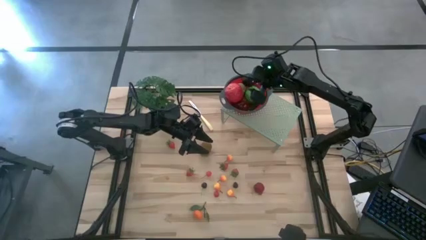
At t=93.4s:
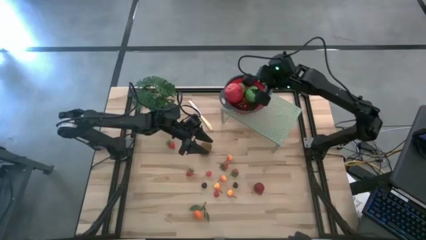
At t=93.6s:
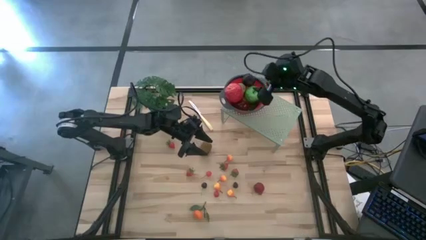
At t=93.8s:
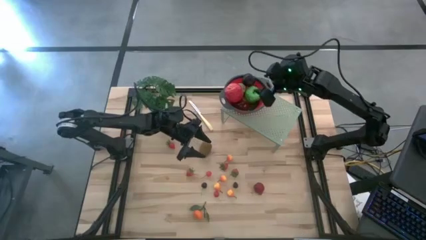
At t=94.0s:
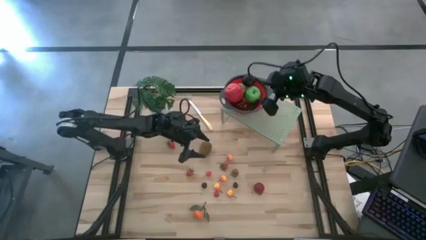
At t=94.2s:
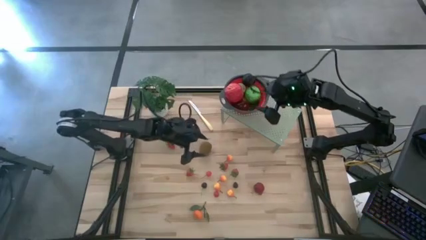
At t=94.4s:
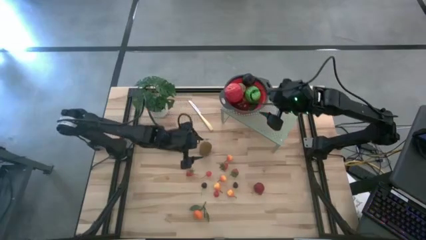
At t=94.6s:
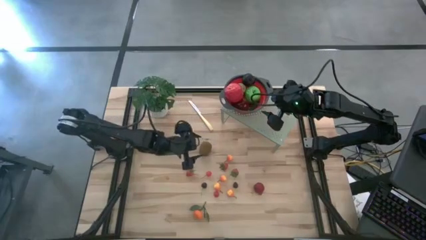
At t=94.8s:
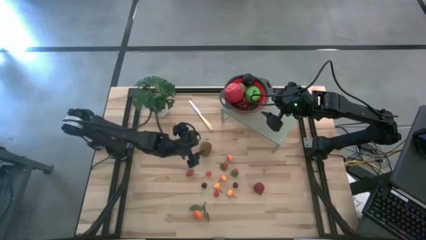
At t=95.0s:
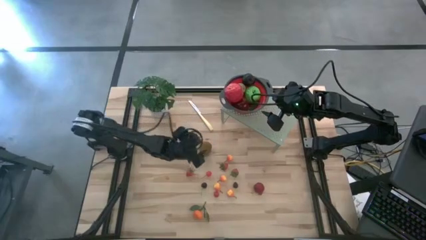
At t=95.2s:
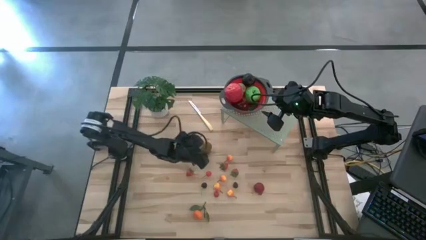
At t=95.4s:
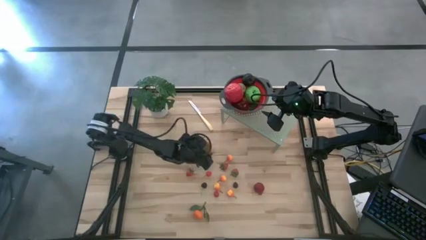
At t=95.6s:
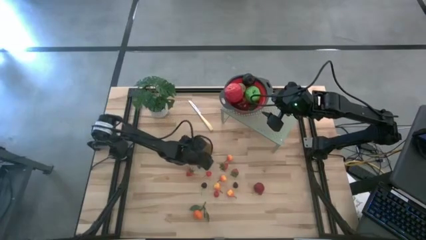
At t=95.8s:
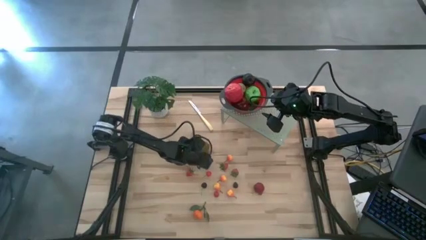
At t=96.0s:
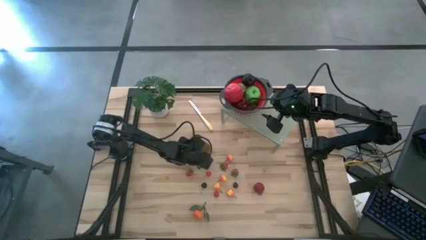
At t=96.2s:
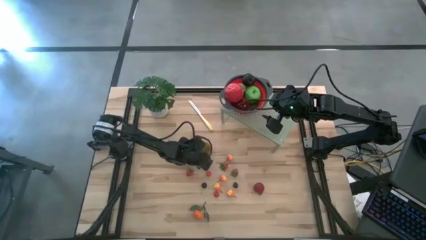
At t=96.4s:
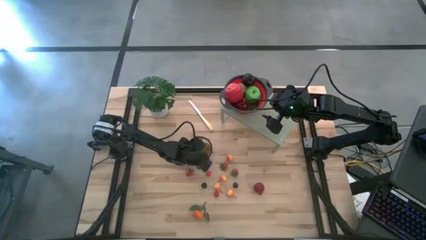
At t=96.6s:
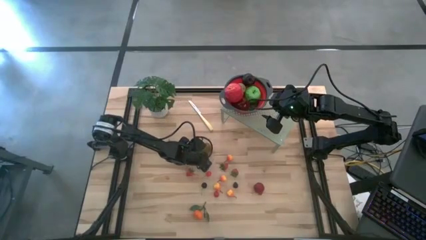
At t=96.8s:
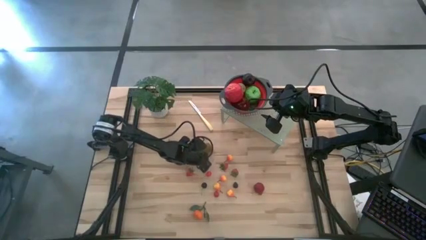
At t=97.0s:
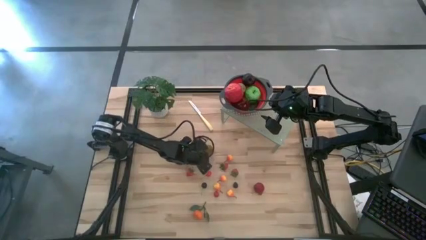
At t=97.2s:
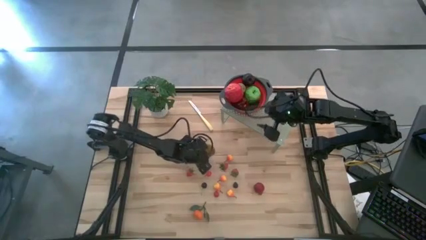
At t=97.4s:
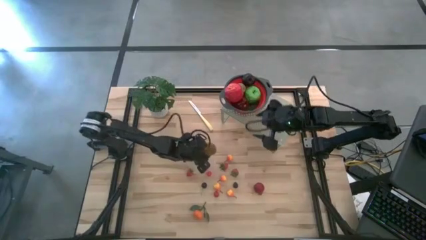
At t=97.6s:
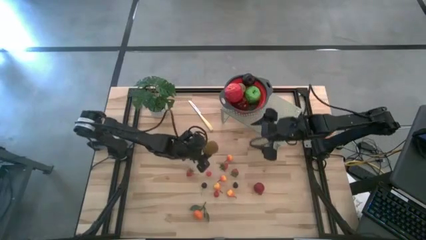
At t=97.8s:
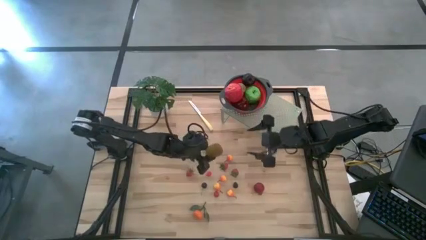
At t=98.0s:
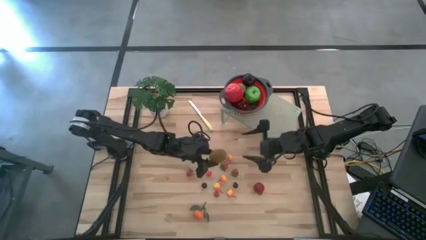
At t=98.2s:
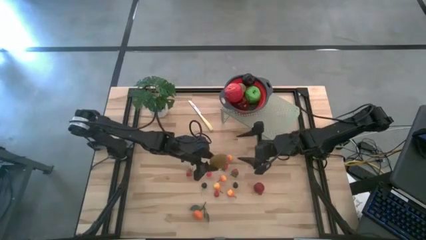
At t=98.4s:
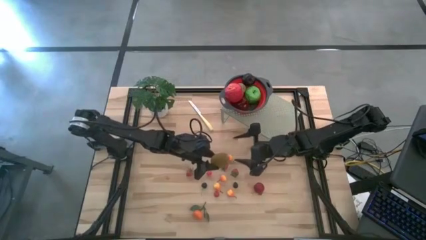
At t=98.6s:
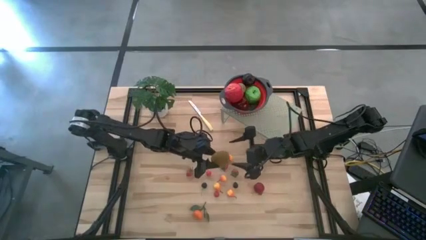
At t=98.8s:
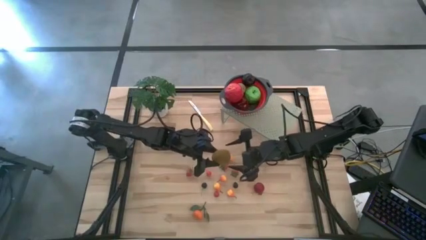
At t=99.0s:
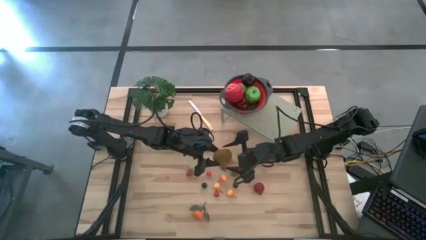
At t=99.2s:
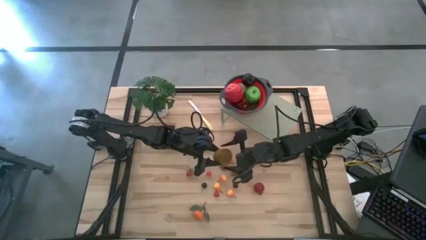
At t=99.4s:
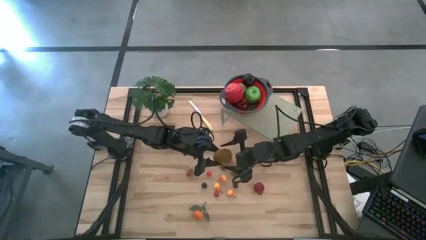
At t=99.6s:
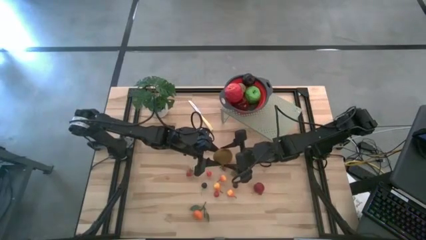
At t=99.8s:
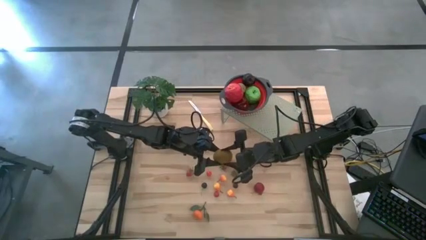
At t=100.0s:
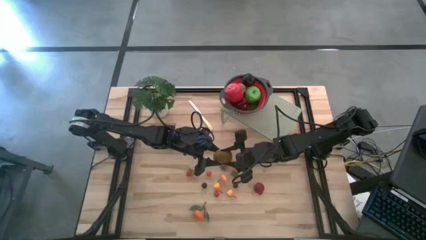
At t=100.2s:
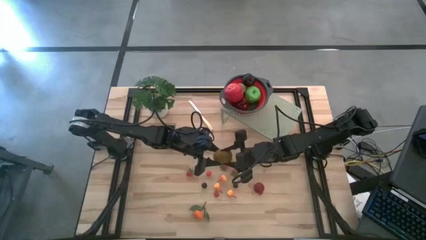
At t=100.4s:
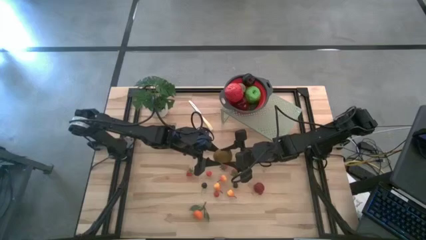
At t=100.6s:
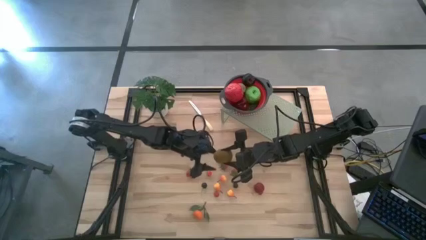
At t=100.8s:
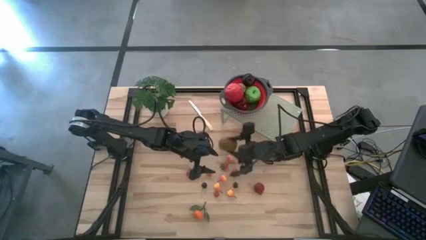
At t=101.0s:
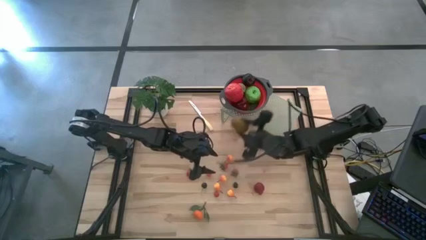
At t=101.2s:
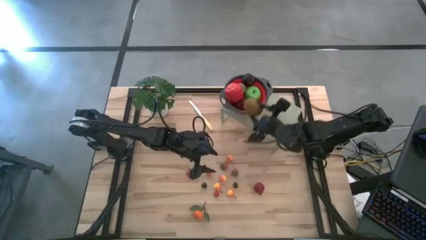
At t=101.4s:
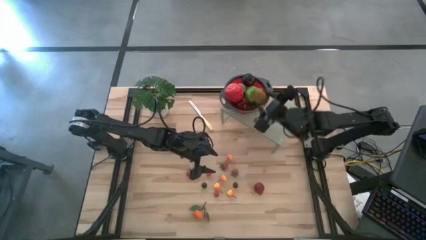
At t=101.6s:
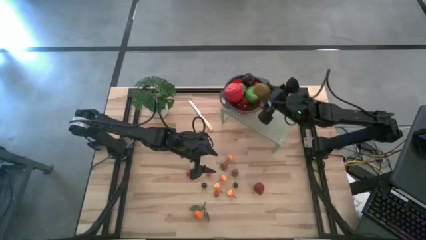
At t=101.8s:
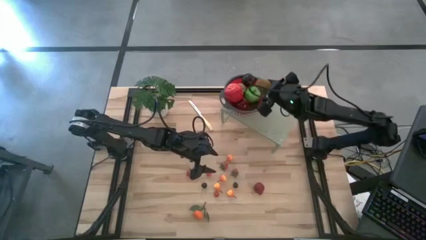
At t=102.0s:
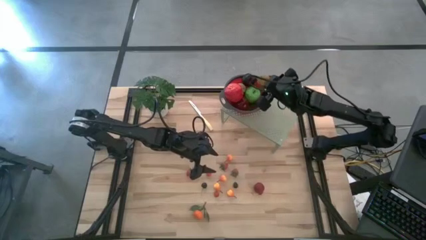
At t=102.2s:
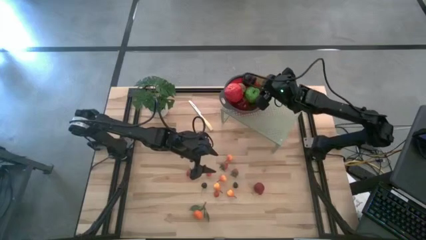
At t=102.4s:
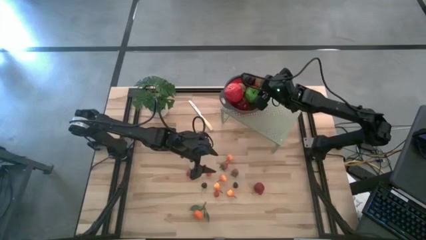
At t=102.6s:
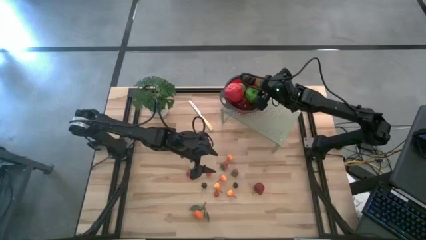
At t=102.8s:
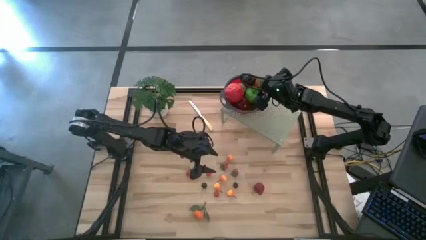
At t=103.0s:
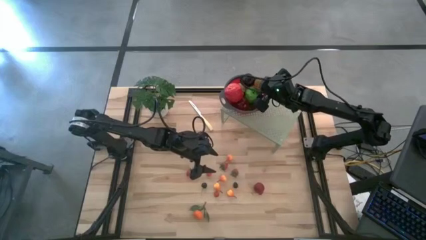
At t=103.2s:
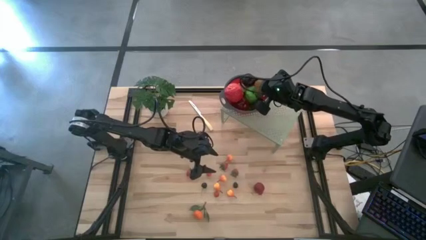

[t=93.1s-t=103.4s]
Task: Pick & Place Fruit
Put the kiwi into the red gray colander on the shelf

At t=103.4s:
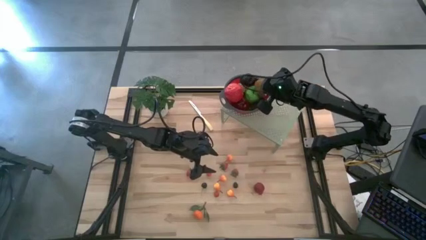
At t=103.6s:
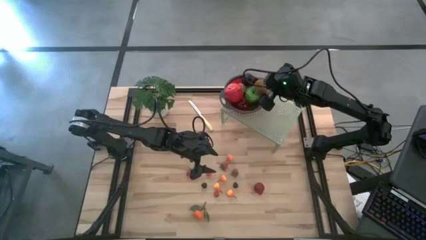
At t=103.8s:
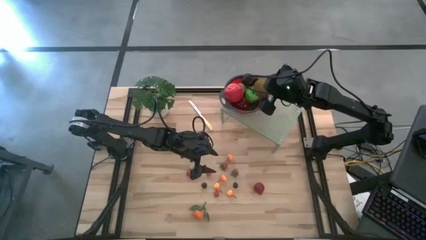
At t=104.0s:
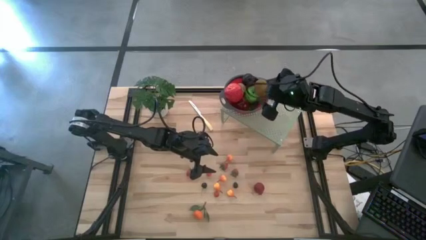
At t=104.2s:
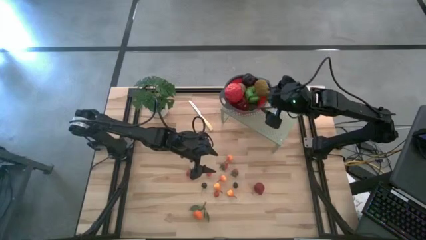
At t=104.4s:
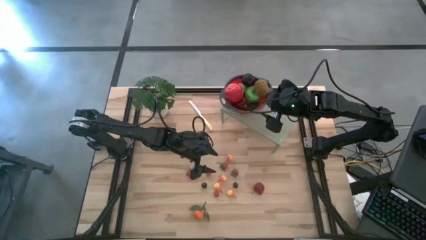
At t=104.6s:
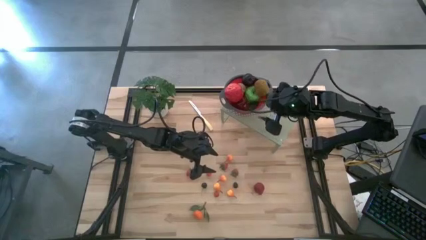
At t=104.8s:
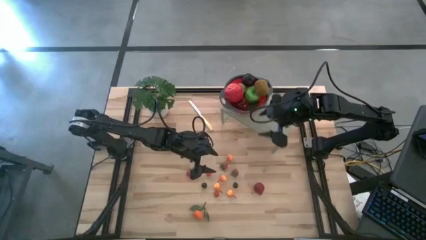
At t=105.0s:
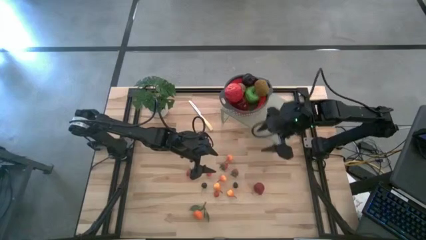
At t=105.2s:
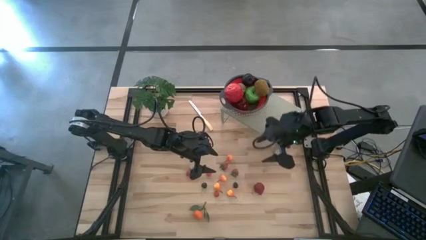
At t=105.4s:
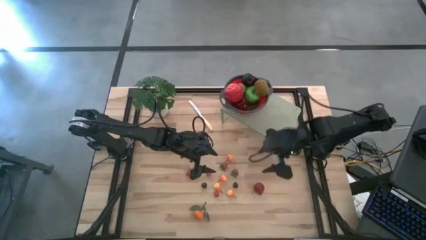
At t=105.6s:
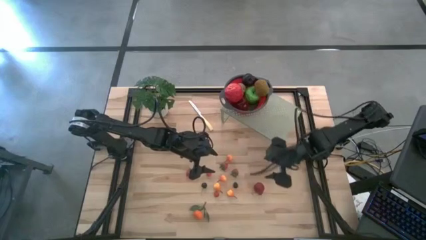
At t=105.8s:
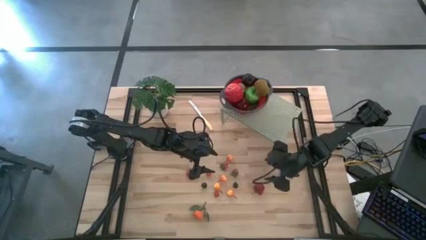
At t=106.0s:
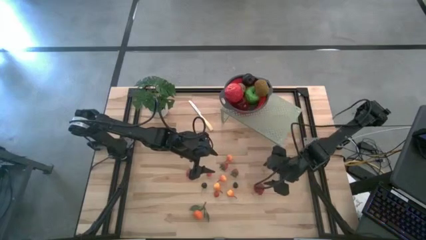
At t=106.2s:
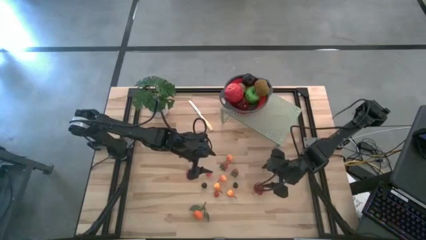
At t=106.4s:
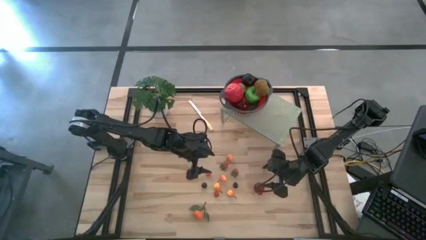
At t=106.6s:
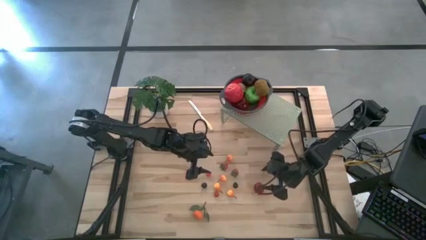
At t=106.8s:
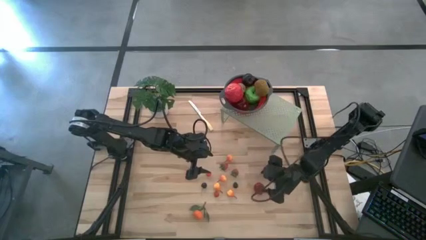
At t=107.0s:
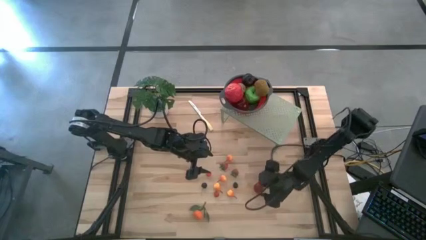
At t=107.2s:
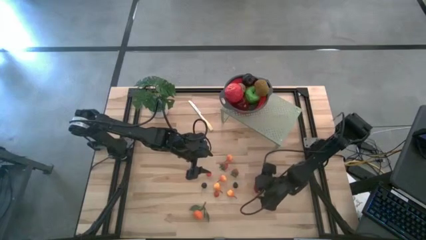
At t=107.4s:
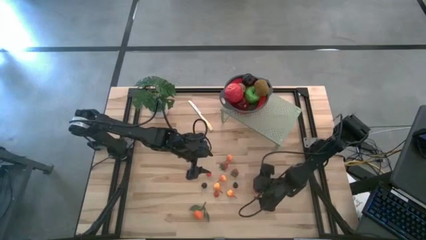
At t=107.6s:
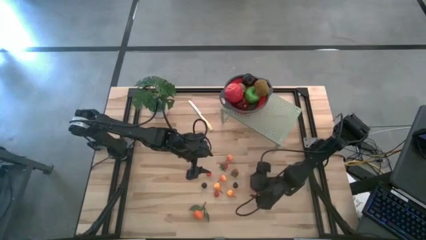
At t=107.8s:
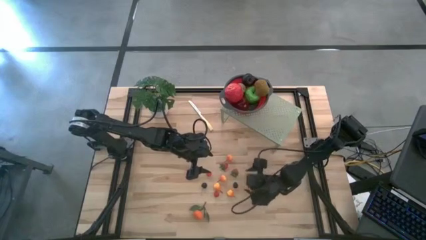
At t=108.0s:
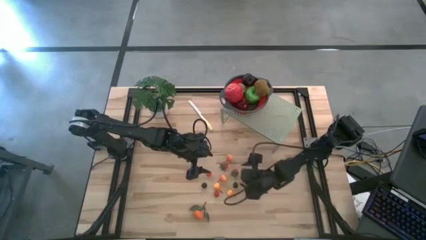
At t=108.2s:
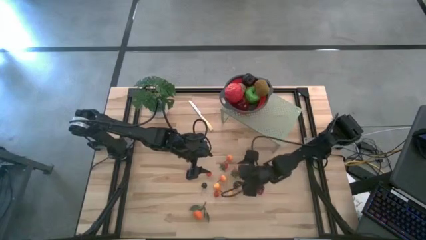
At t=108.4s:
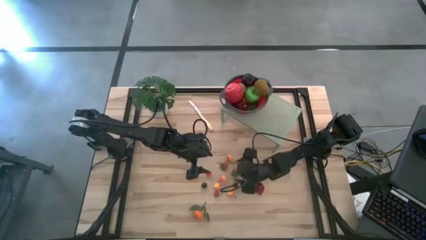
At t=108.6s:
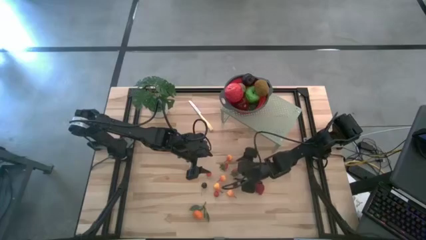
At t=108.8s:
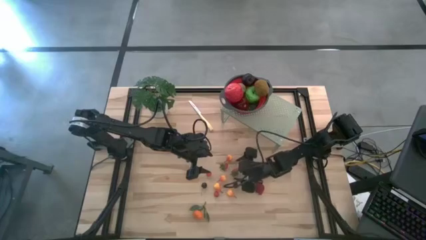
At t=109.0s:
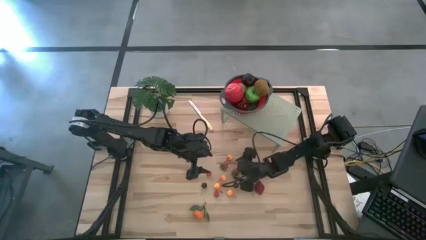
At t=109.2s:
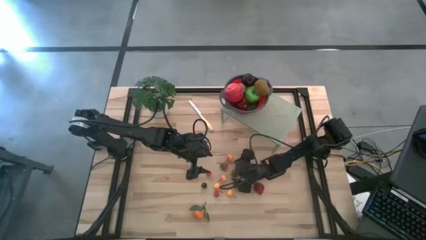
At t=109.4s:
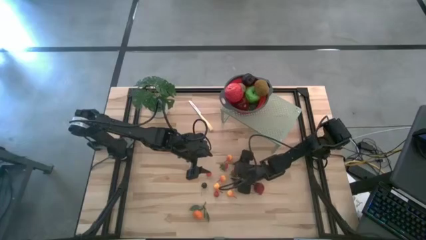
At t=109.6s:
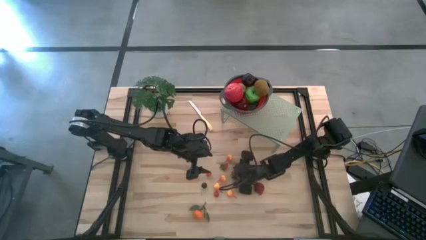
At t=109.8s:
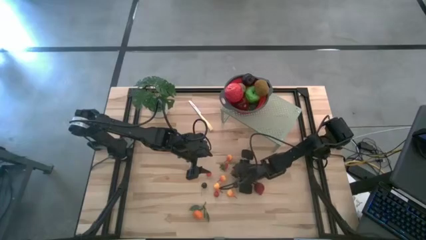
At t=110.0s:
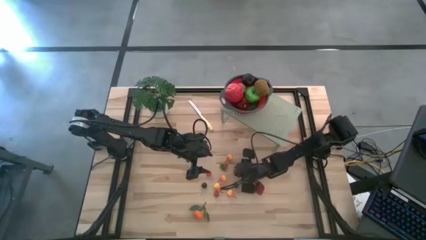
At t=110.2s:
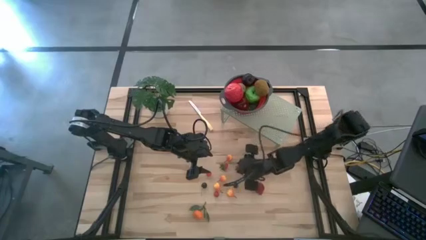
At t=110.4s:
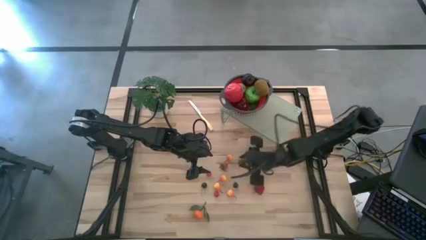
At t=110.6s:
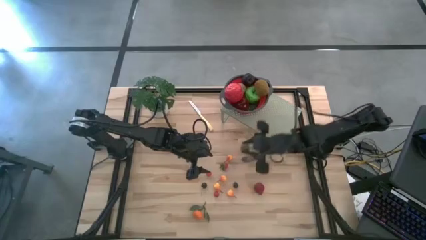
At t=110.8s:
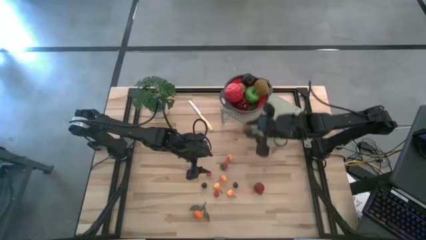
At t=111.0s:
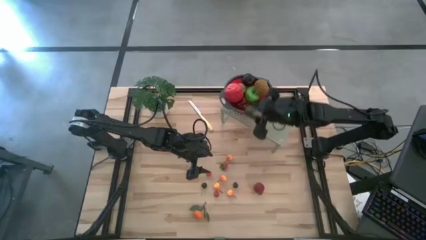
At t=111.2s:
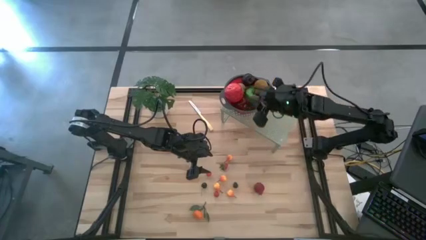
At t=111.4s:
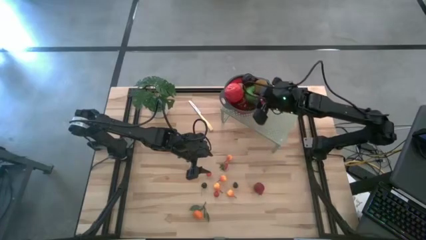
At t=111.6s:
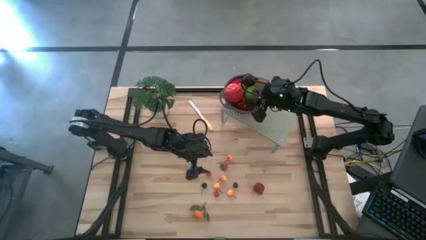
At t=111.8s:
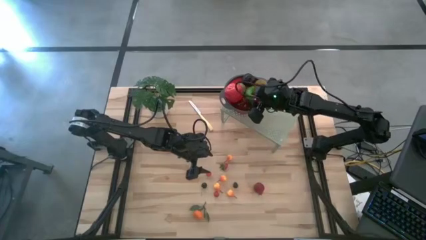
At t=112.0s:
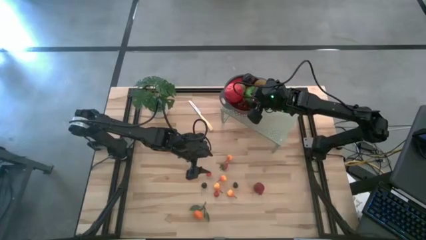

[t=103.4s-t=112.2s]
Put the strawberry into the red gray colander on the shelf
